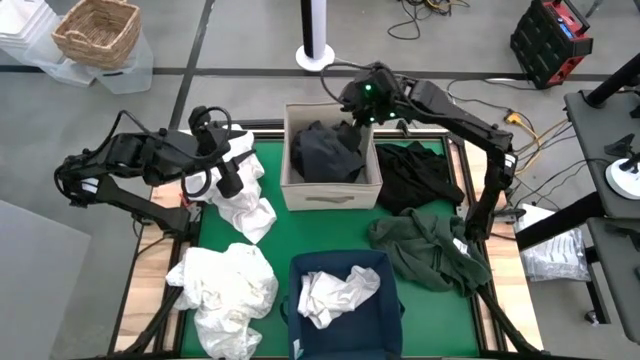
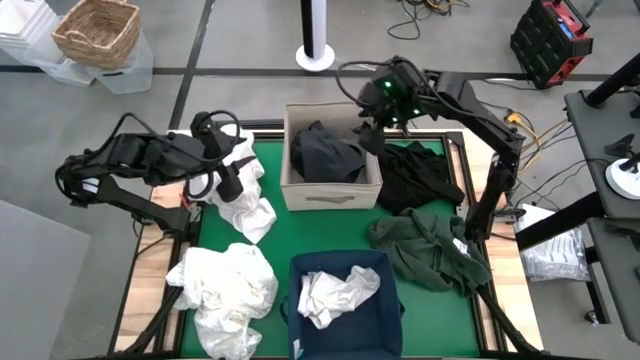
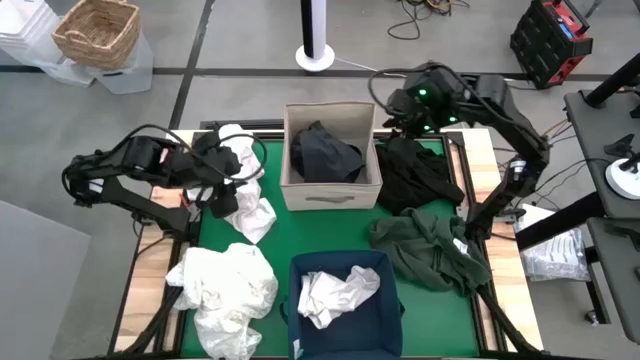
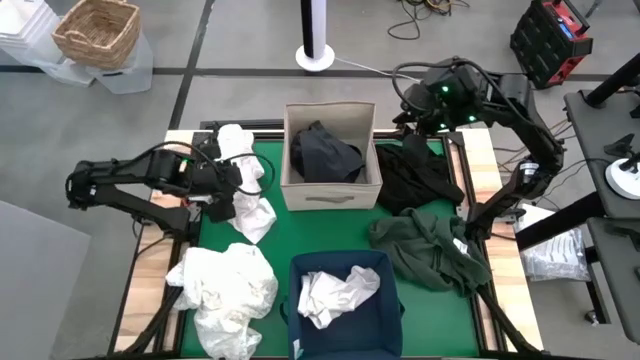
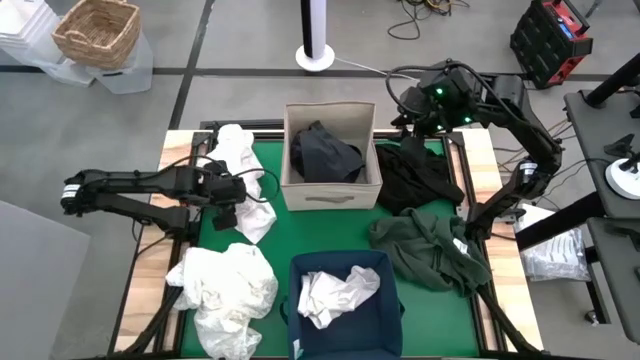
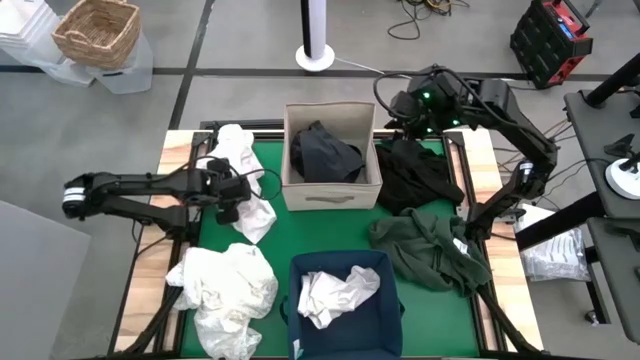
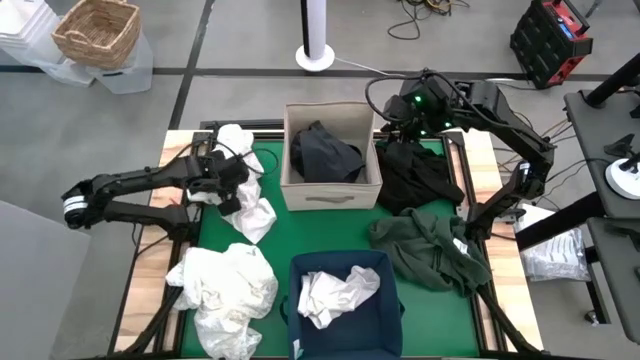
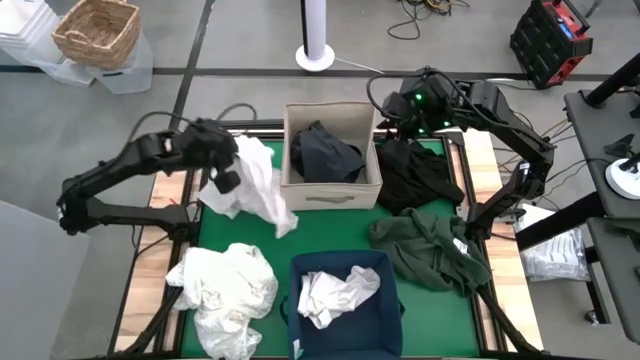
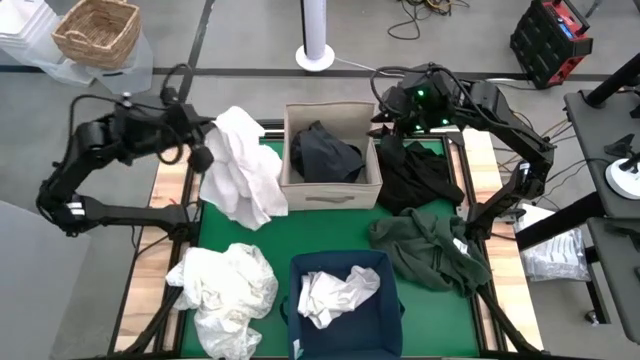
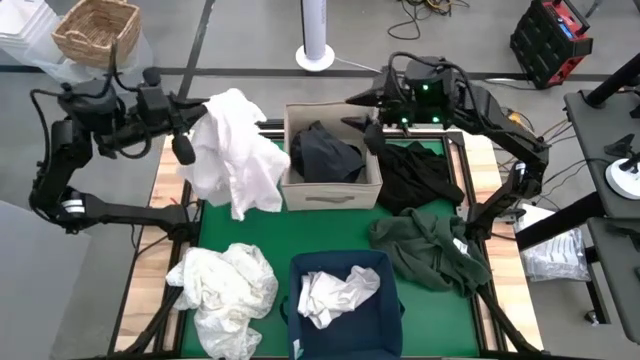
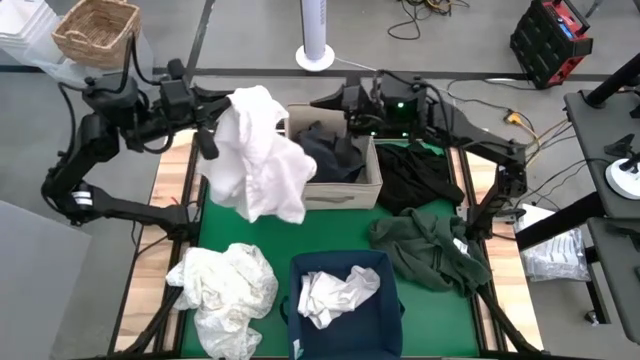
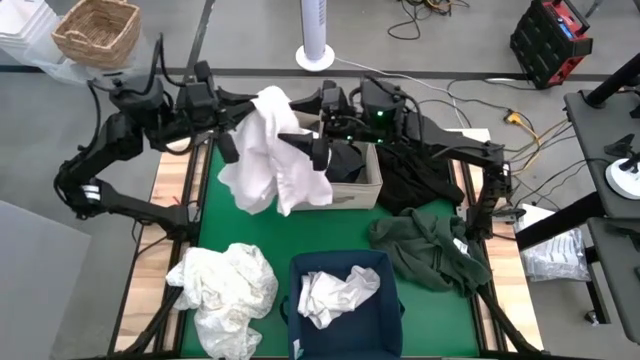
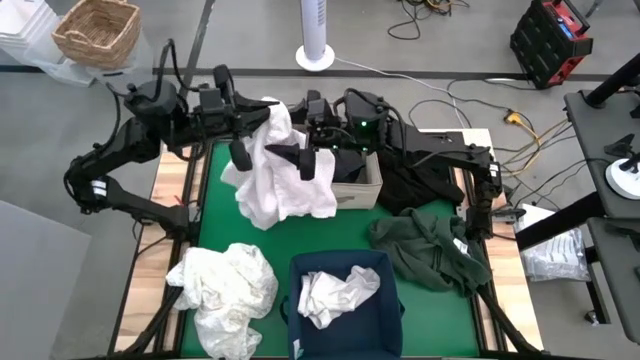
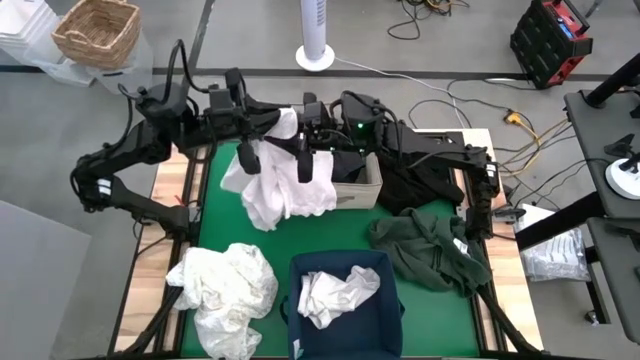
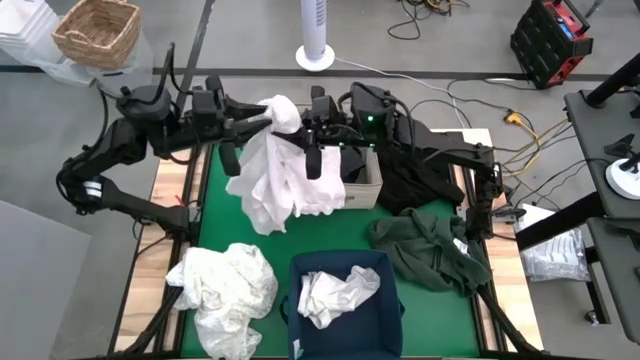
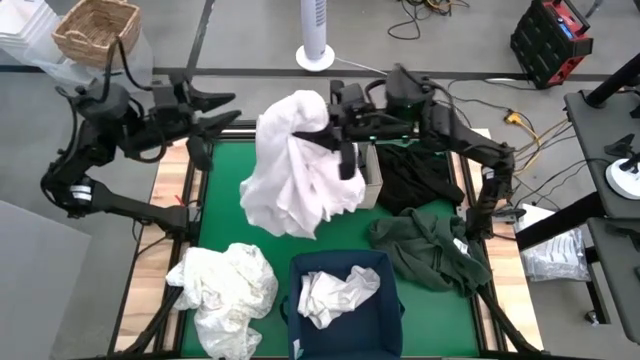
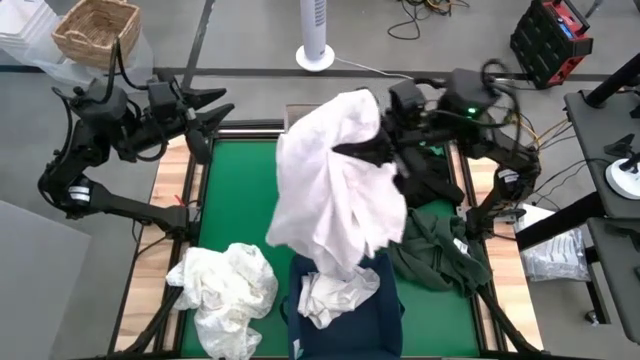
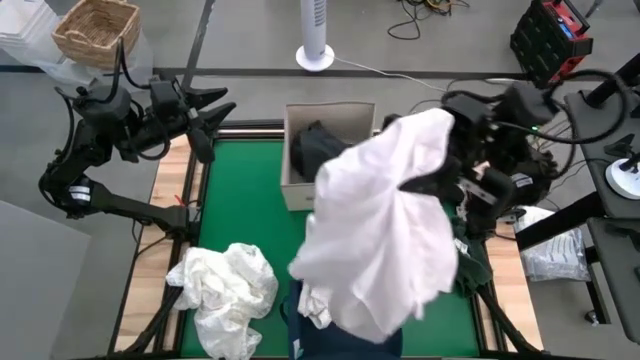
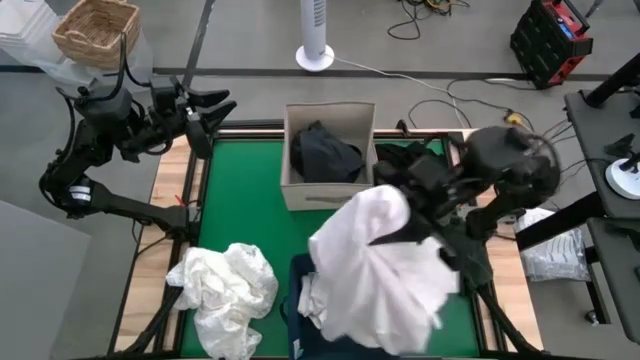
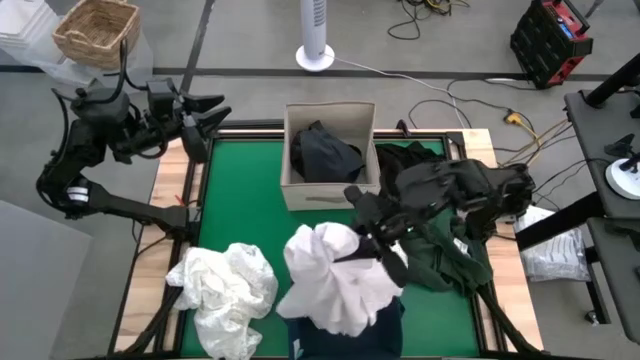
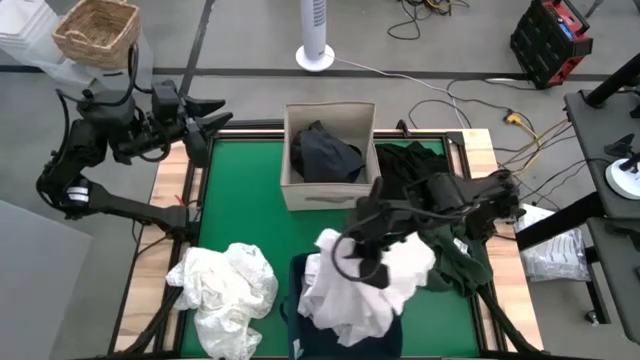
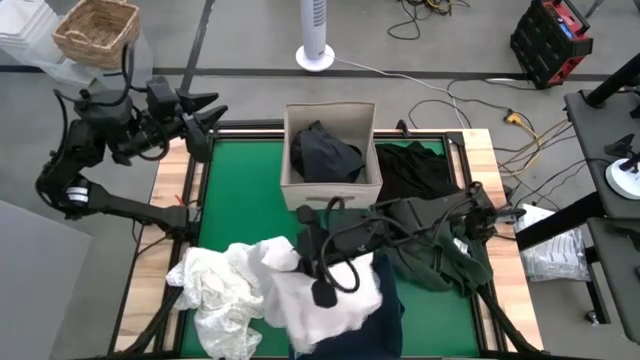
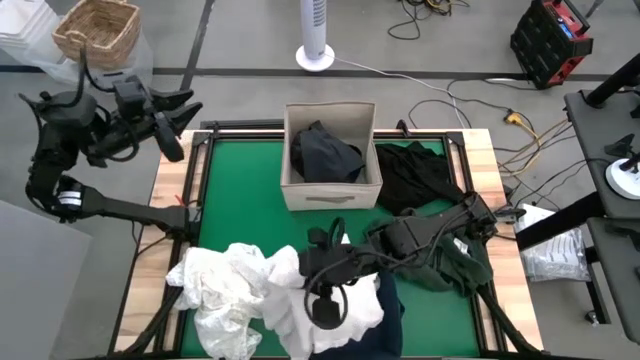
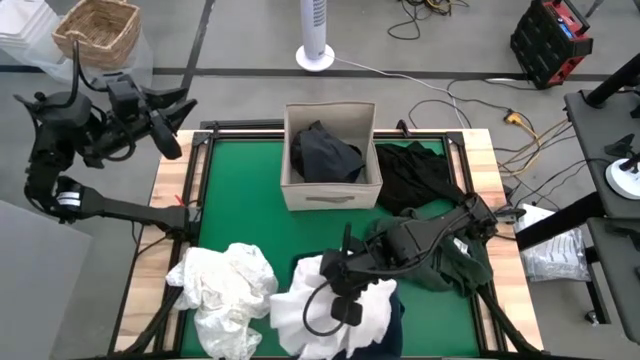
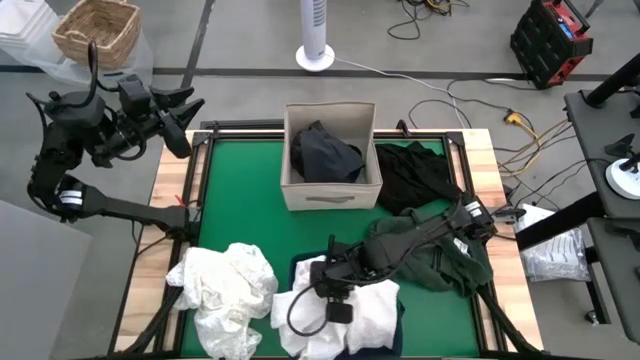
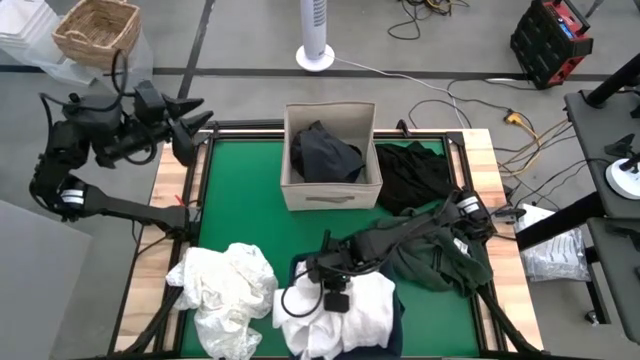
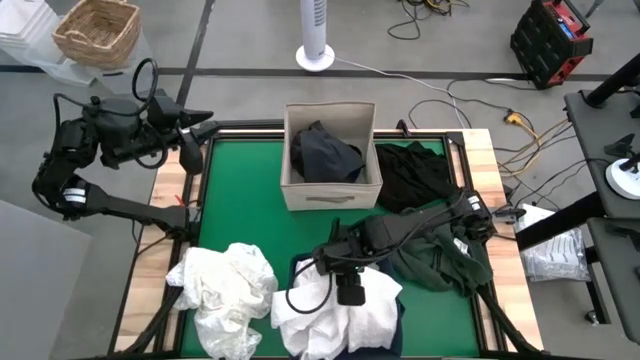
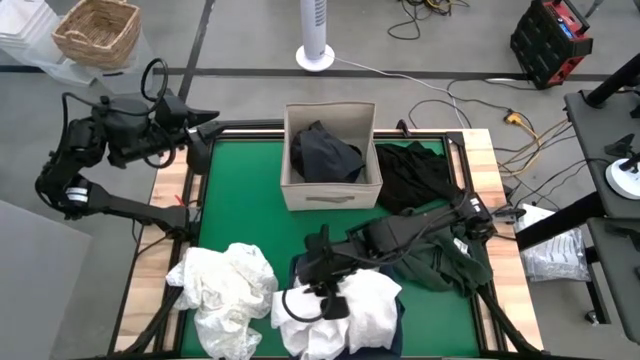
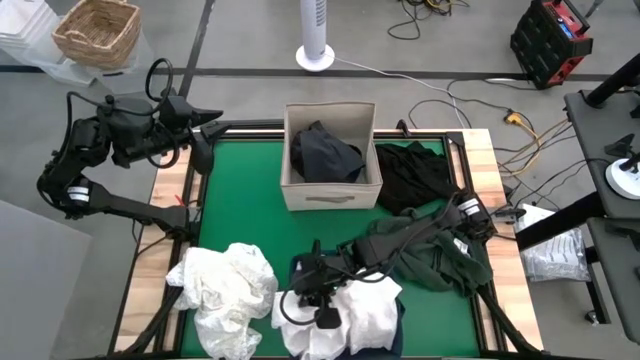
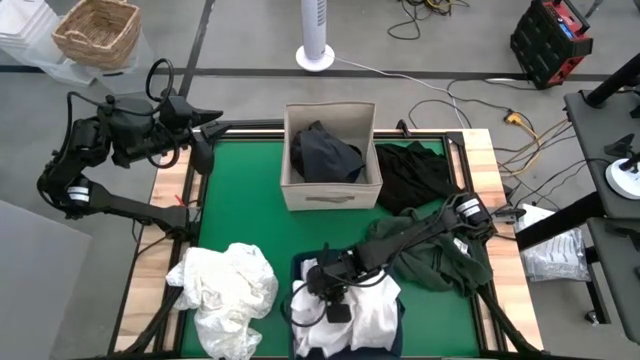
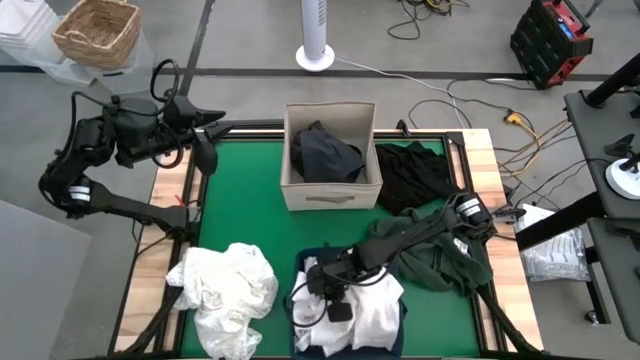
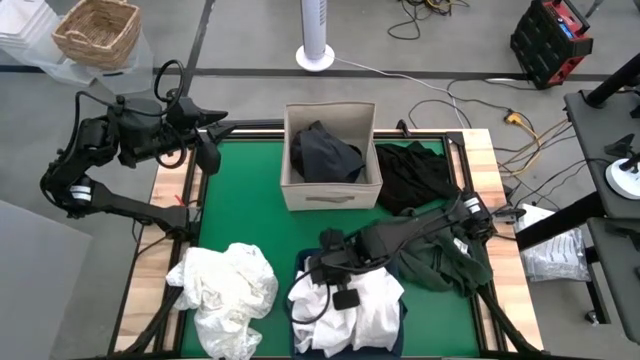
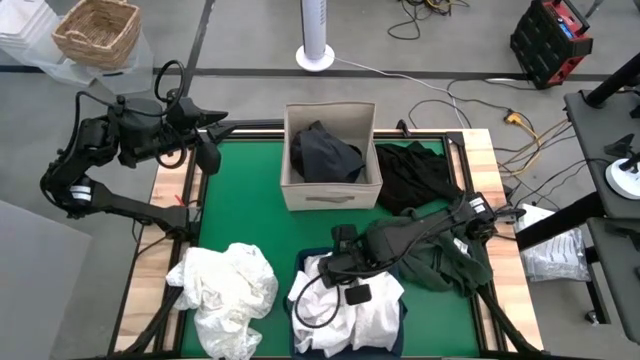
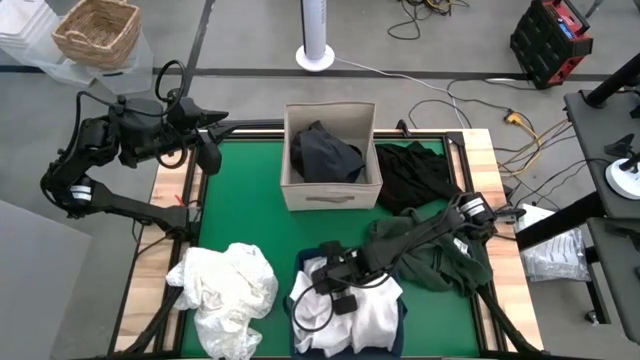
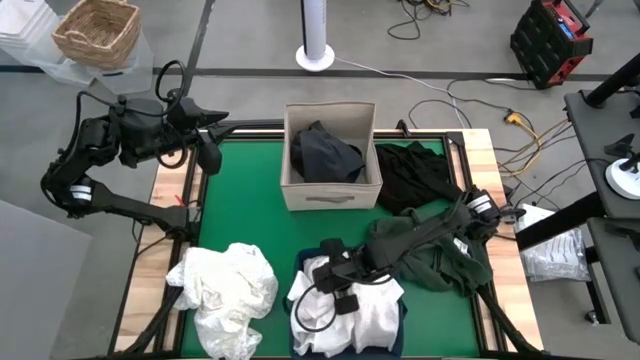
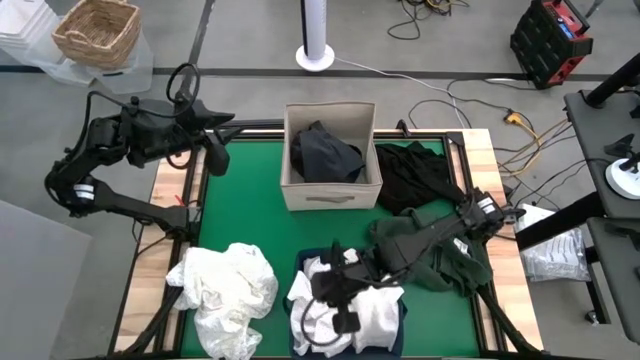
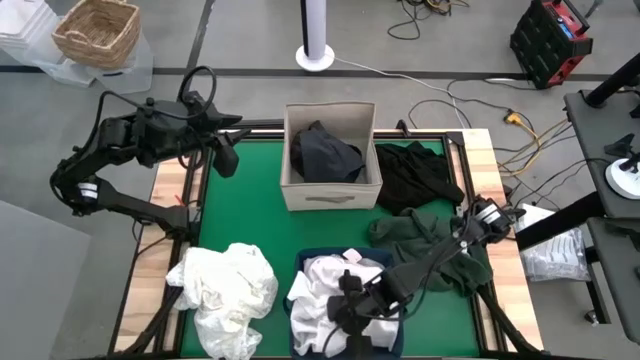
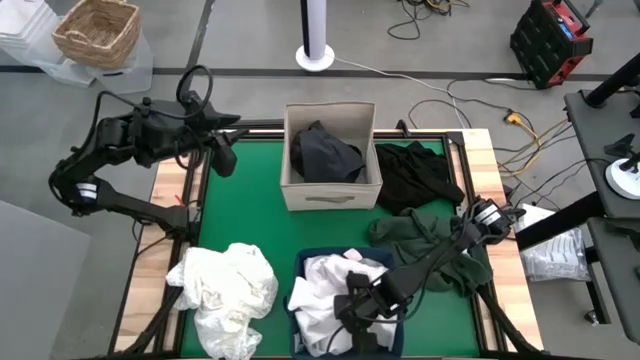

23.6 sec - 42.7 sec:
Put the white polo shirt into the blue laundry bin
